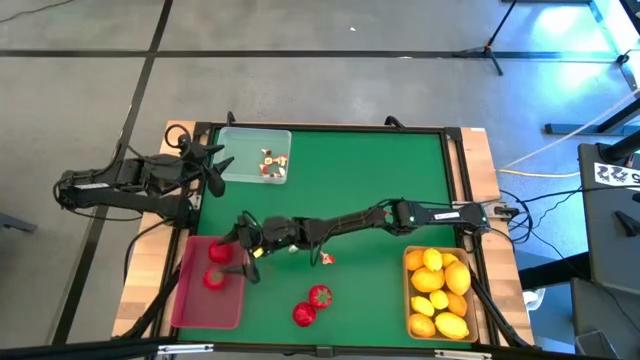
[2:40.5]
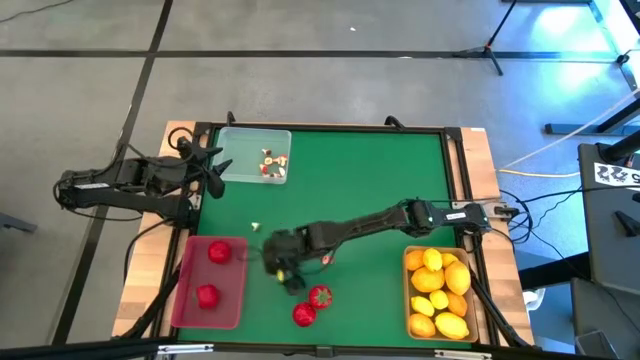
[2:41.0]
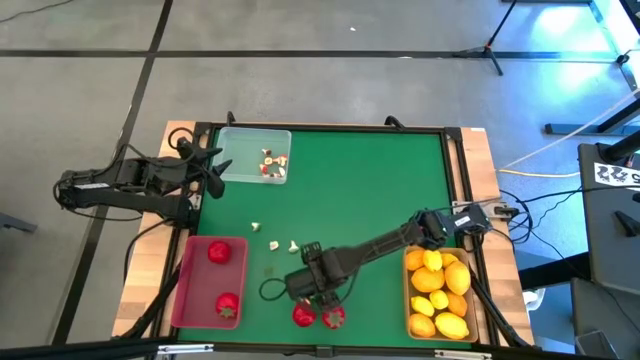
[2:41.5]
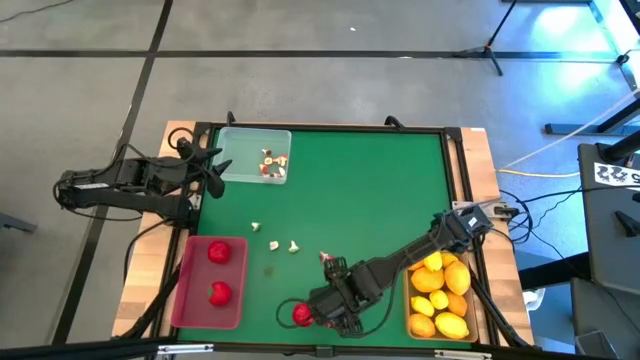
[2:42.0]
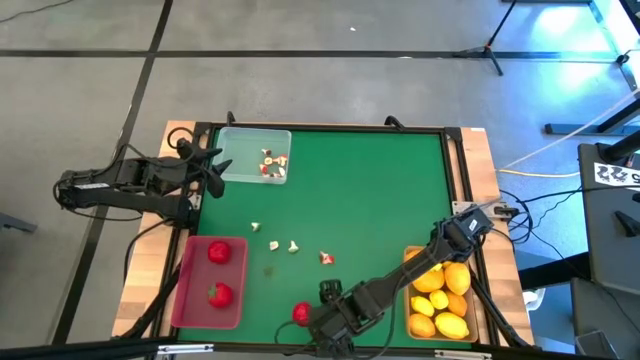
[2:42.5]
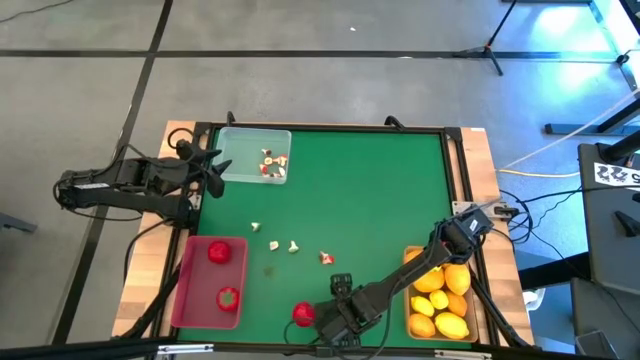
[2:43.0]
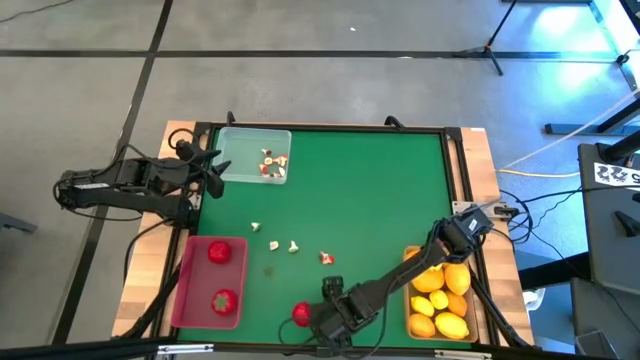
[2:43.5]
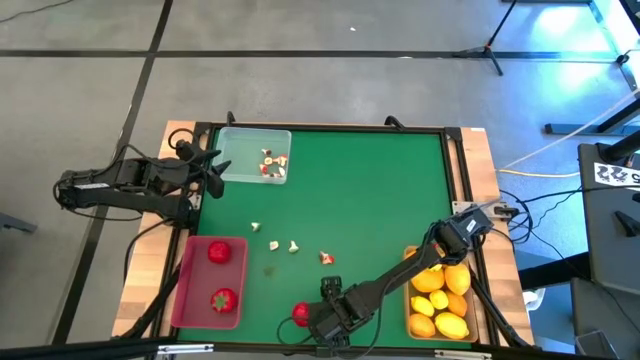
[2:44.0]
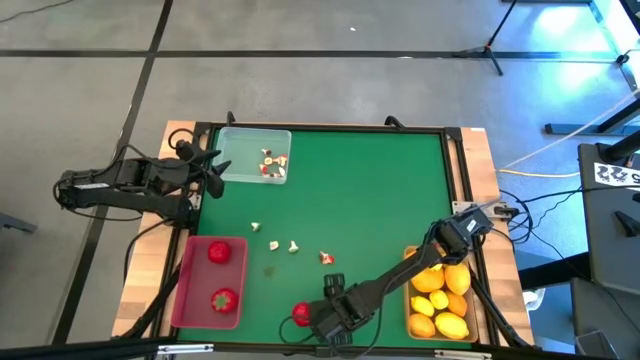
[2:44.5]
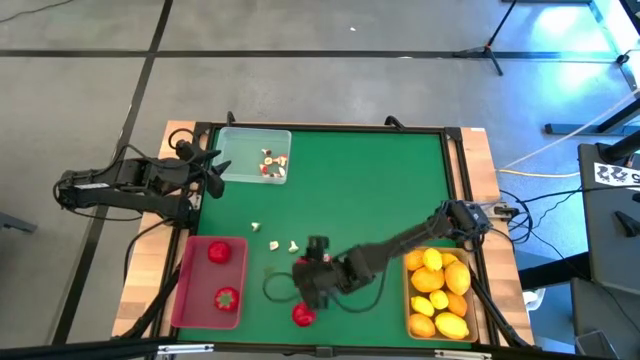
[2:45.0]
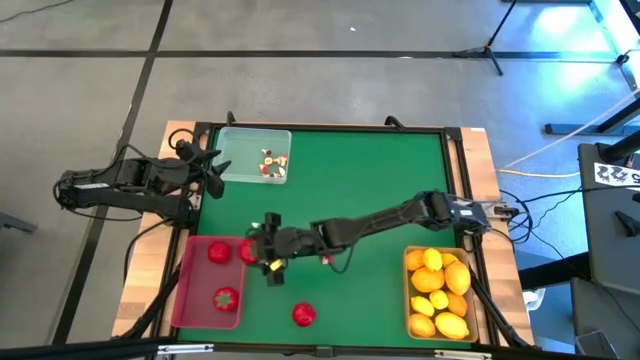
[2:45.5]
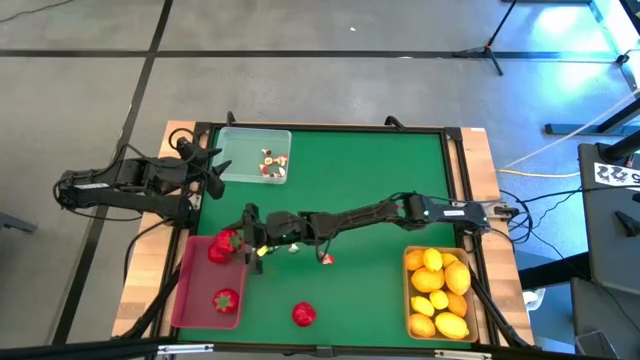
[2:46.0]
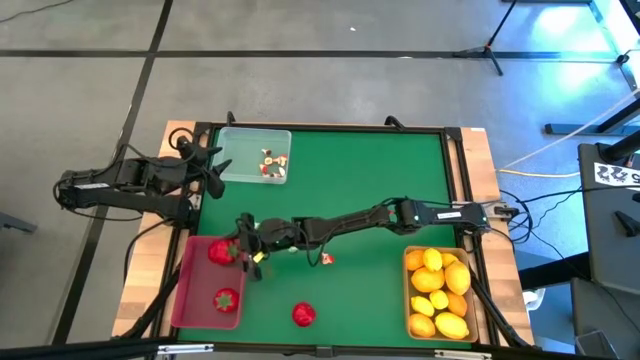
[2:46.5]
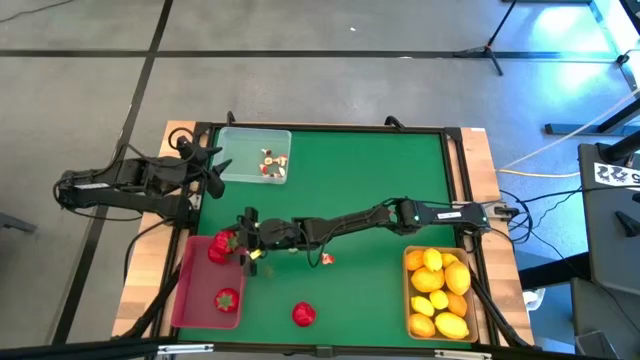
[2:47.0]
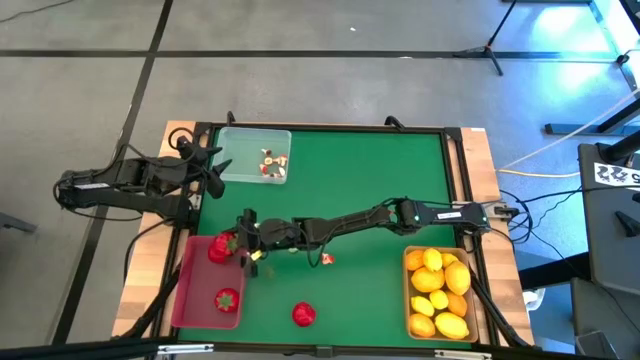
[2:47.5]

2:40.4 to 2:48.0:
Task: Sort produce into baskets
Put the tomato into the pink bin

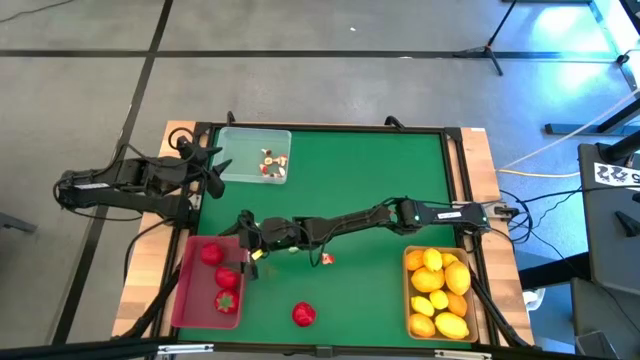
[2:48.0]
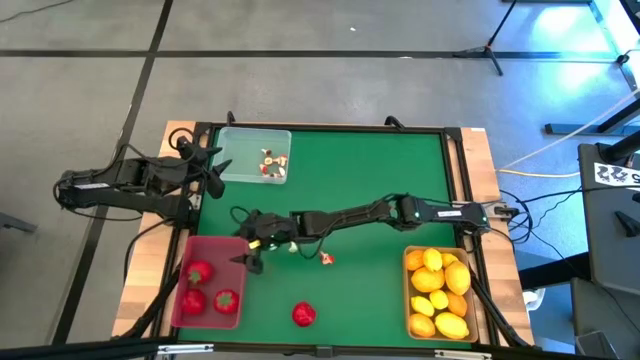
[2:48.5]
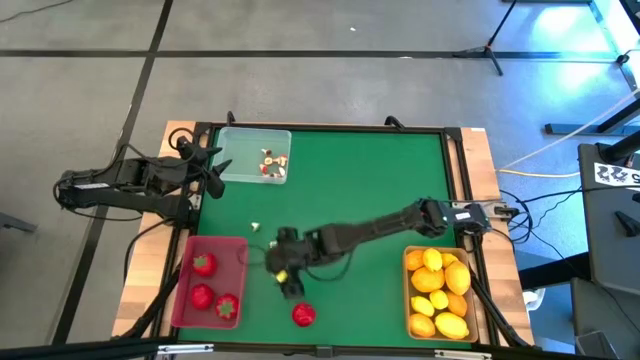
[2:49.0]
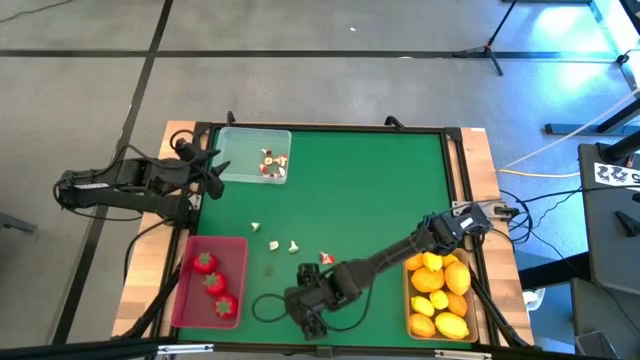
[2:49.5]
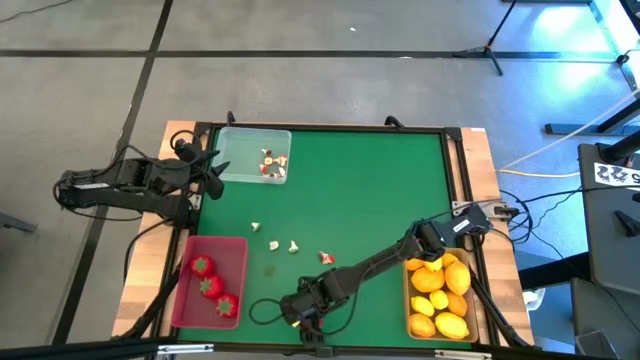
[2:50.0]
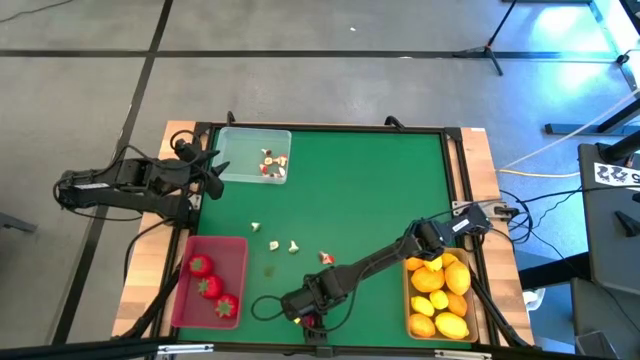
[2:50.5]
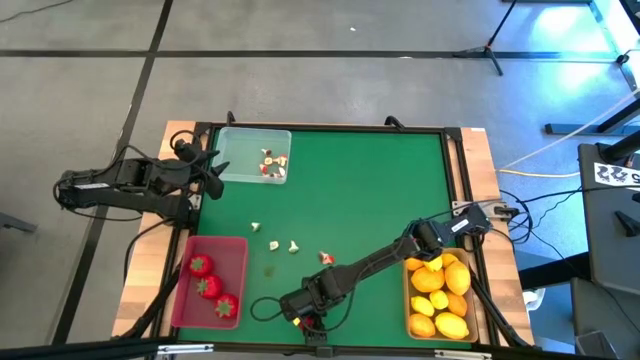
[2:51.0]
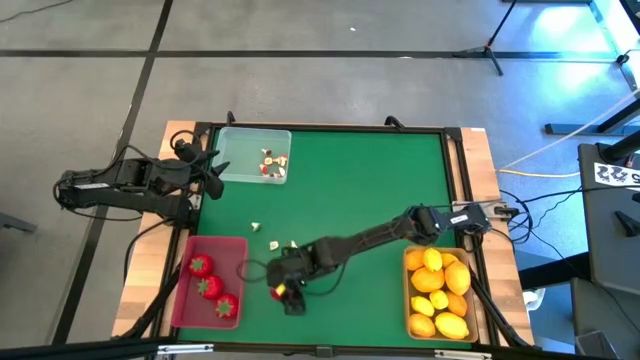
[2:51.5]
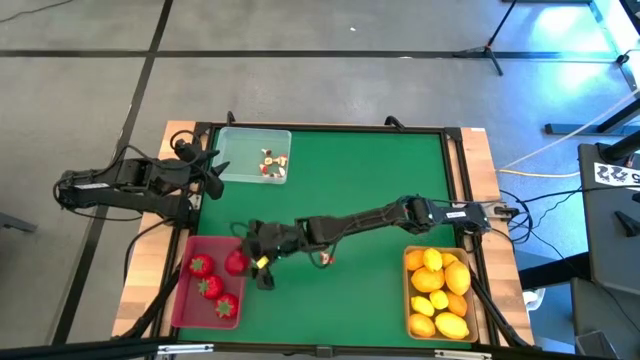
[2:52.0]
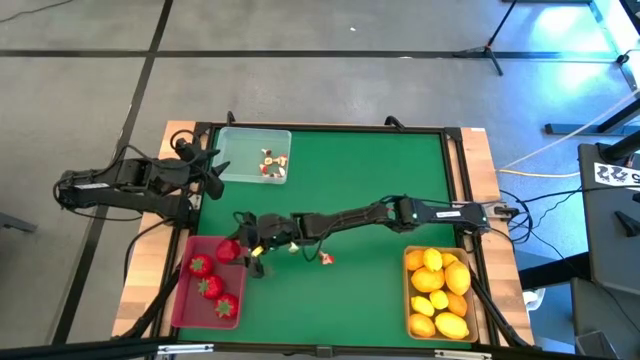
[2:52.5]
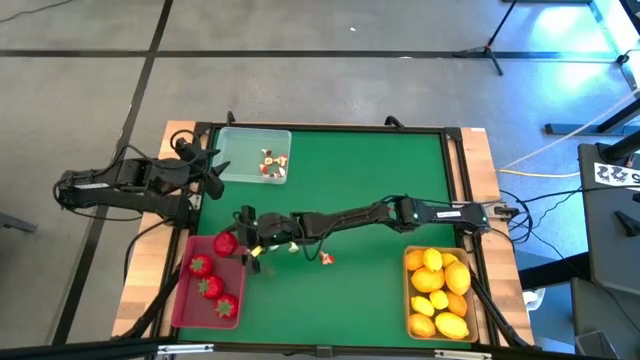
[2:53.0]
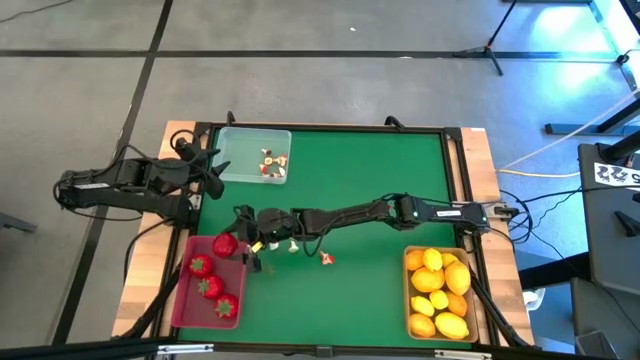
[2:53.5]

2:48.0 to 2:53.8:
Put the tomato into the pink bin

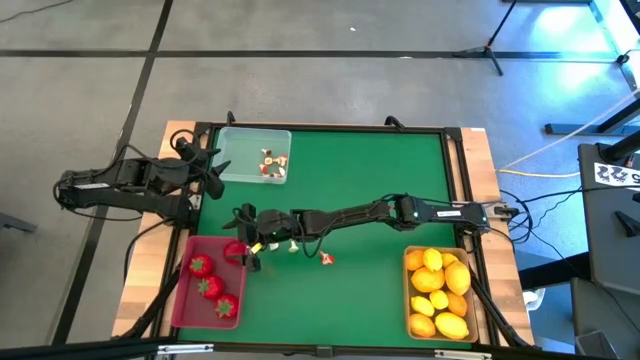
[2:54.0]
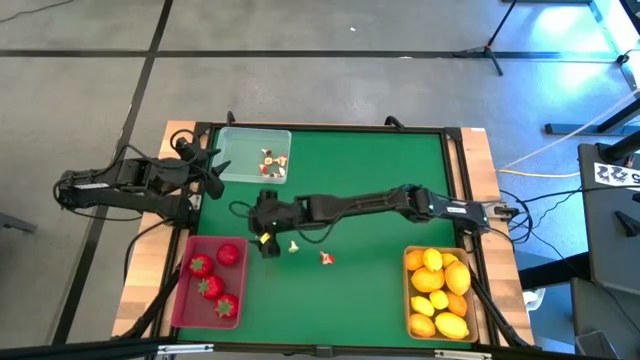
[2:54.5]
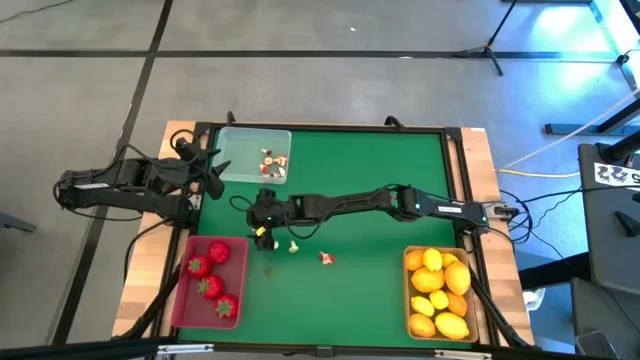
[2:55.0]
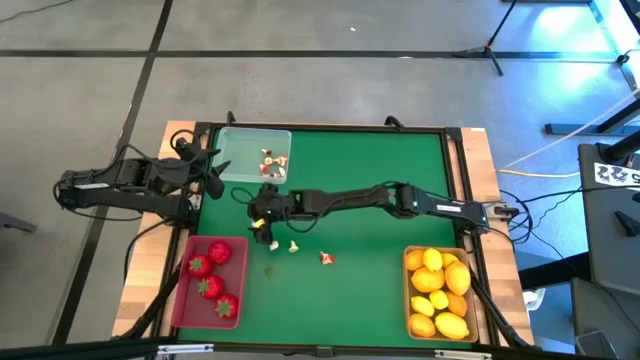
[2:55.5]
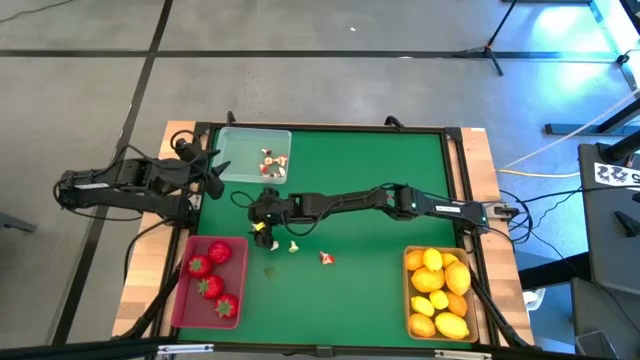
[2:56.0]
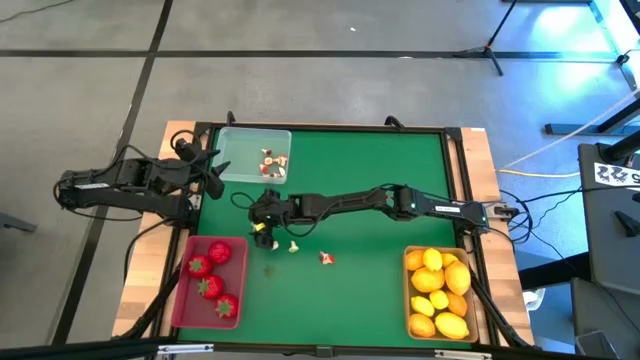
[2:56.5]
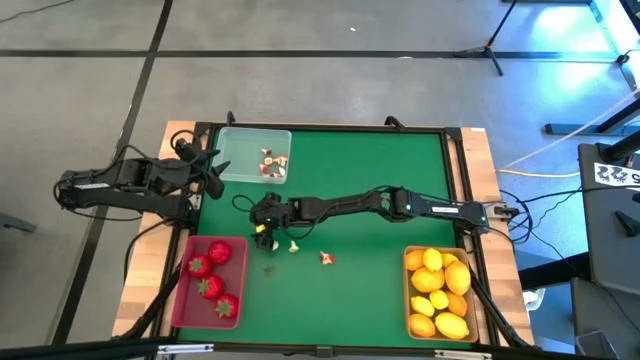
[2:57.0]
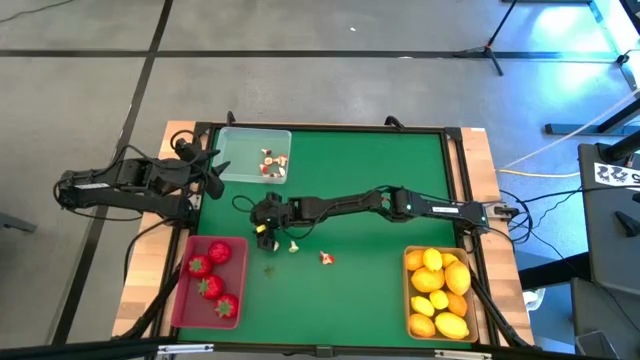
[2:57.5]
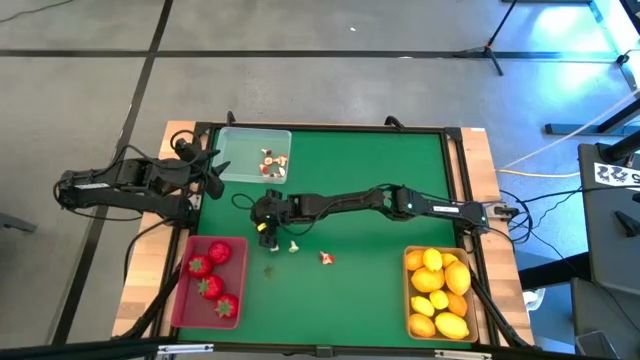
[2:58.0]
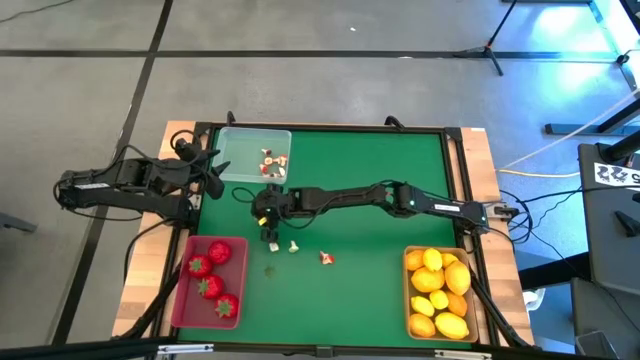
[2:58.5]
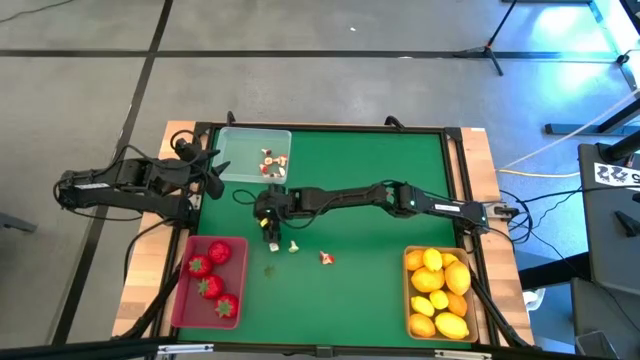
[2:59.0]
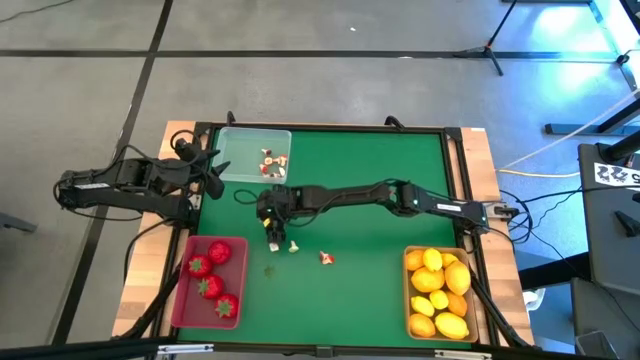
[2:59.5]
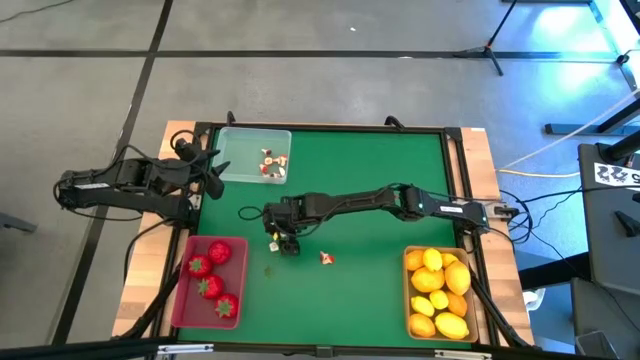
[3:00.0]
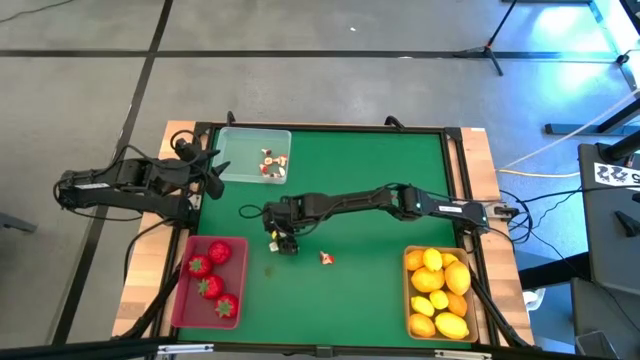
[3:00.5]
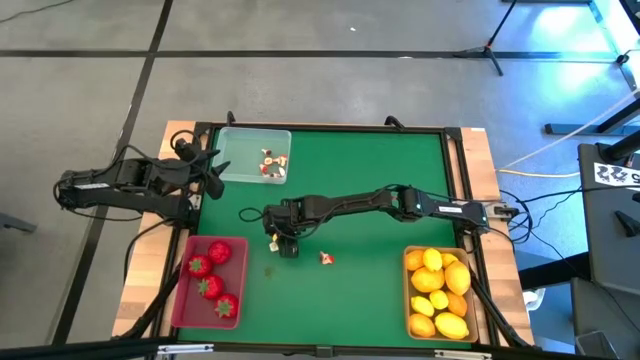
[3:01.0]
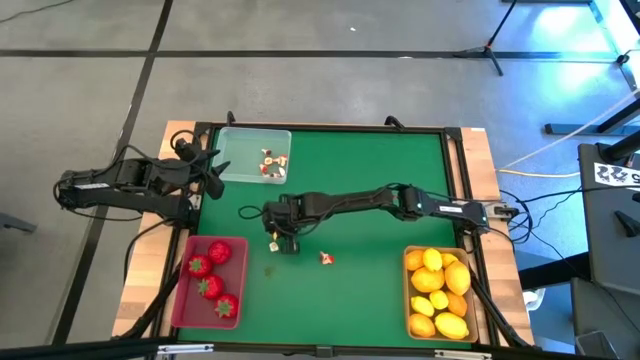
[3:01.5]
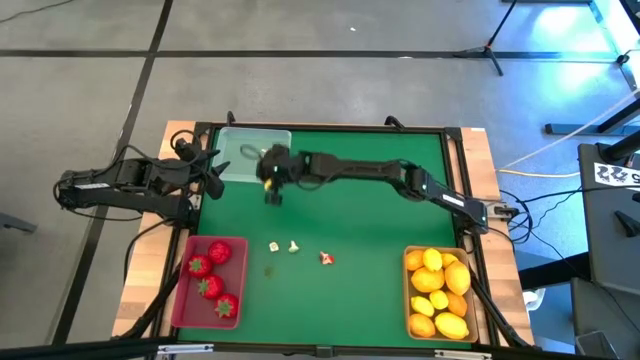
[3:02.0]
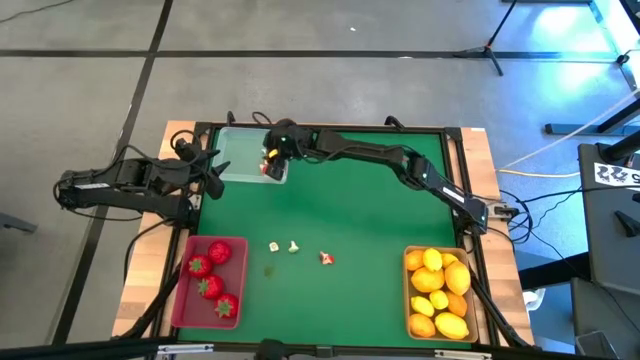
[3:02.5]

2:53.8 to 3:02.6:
Put the green mushroom into the transparent bin
